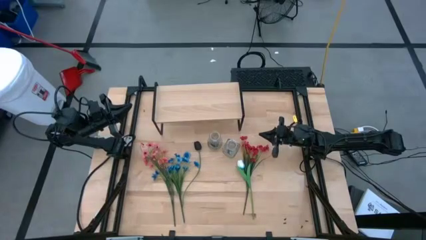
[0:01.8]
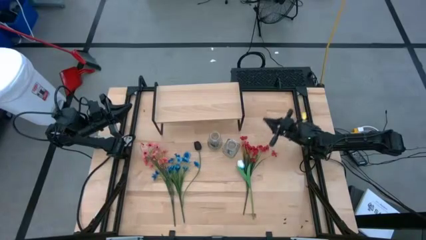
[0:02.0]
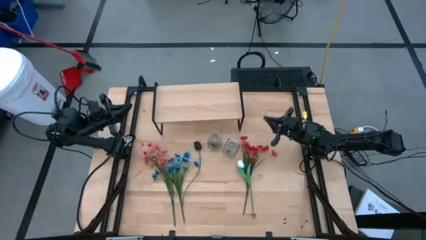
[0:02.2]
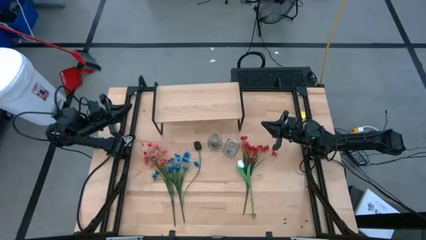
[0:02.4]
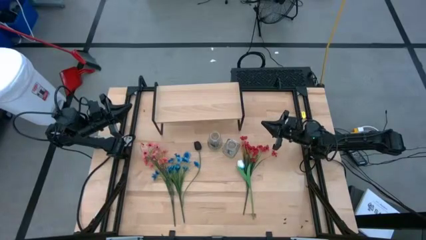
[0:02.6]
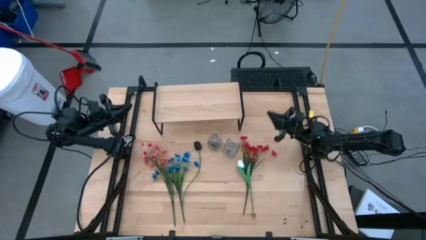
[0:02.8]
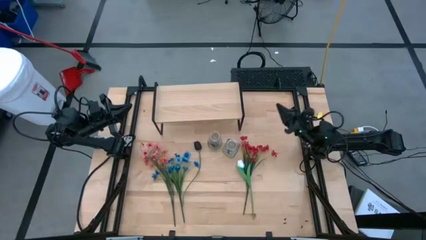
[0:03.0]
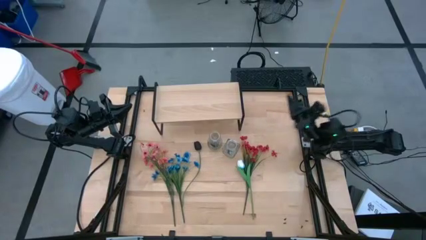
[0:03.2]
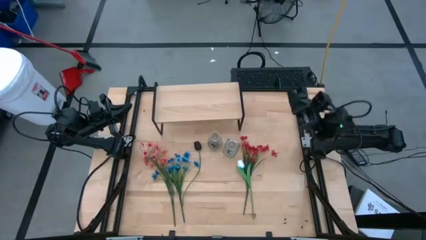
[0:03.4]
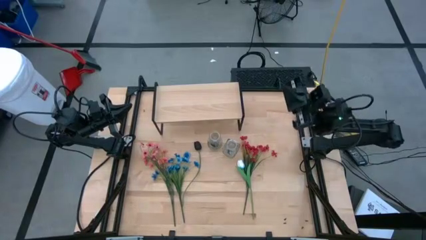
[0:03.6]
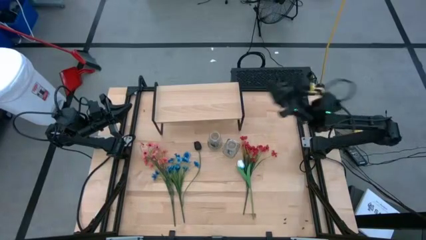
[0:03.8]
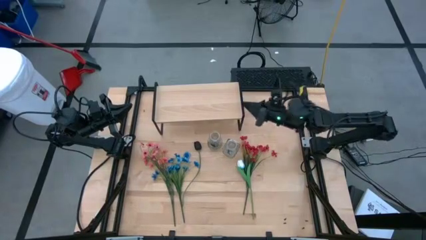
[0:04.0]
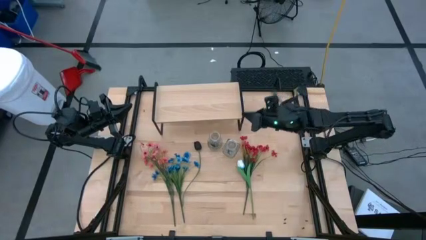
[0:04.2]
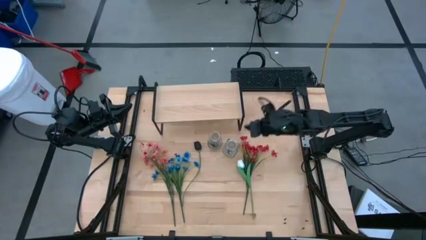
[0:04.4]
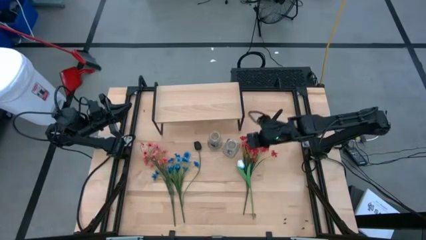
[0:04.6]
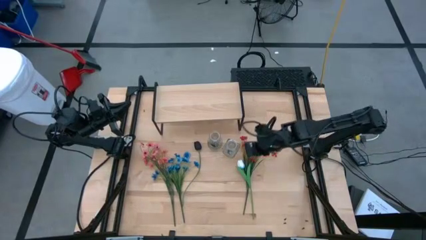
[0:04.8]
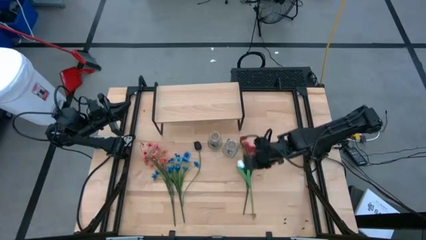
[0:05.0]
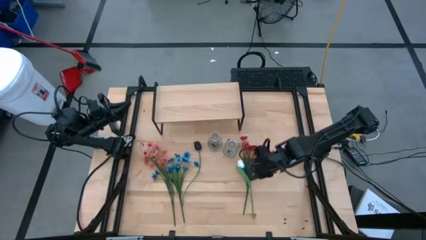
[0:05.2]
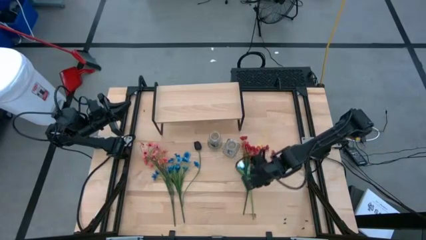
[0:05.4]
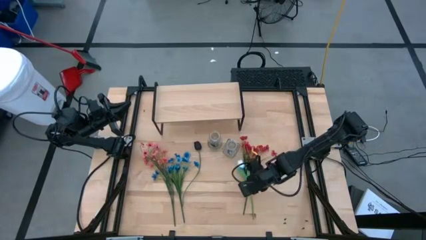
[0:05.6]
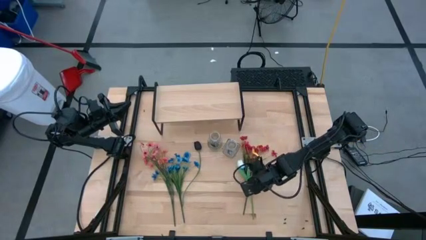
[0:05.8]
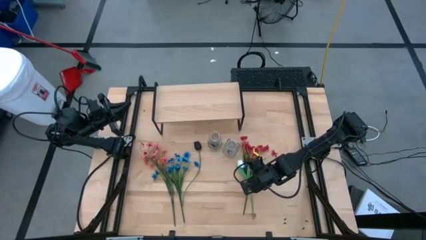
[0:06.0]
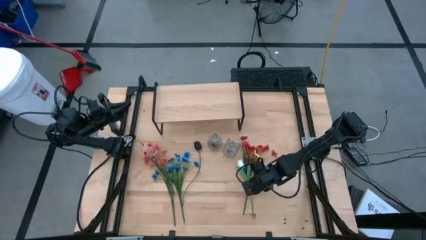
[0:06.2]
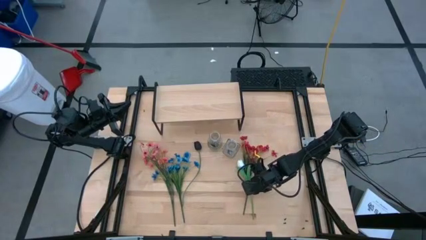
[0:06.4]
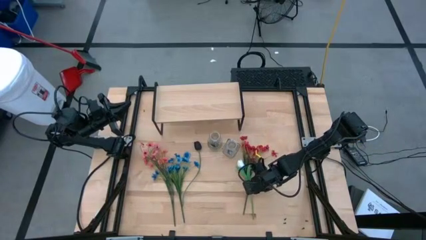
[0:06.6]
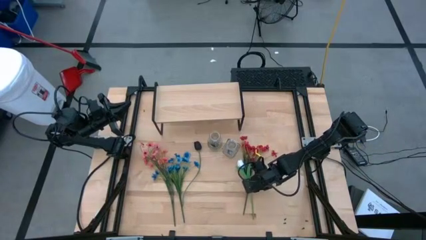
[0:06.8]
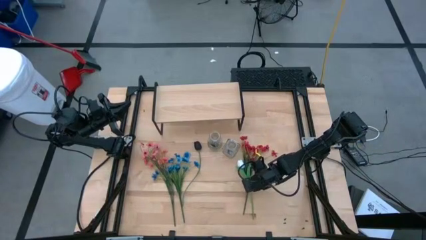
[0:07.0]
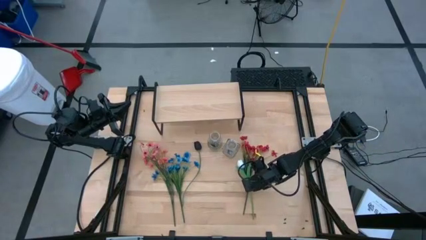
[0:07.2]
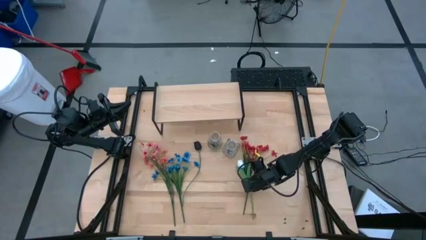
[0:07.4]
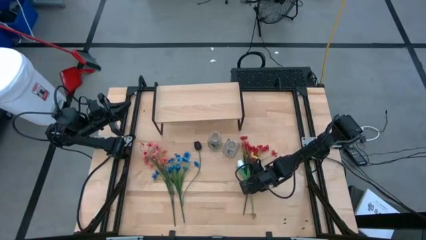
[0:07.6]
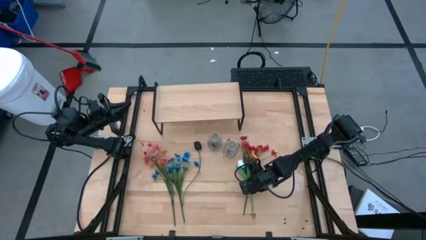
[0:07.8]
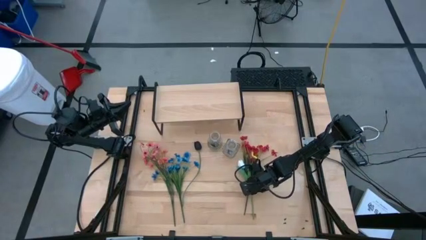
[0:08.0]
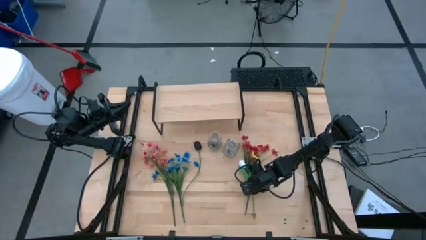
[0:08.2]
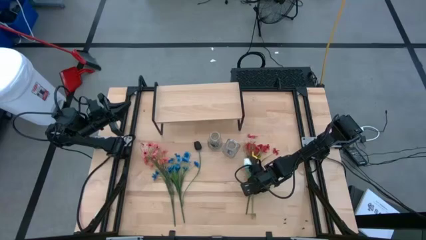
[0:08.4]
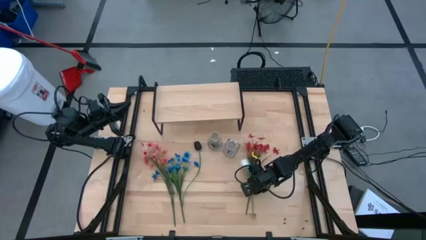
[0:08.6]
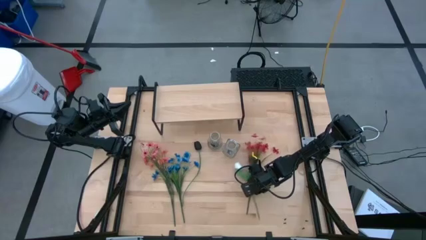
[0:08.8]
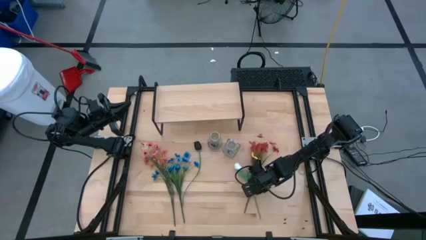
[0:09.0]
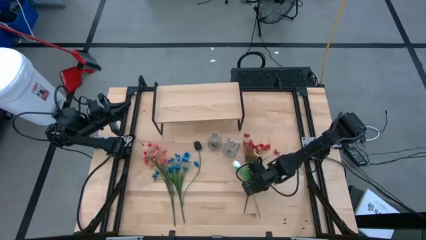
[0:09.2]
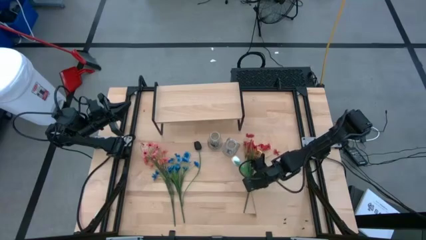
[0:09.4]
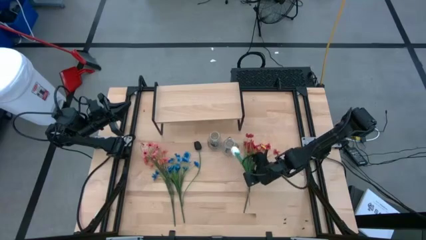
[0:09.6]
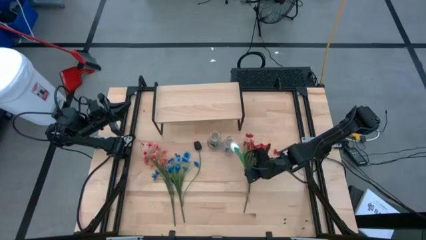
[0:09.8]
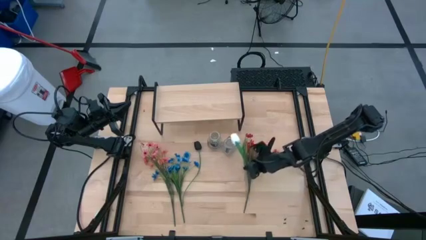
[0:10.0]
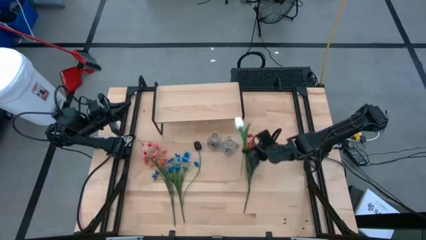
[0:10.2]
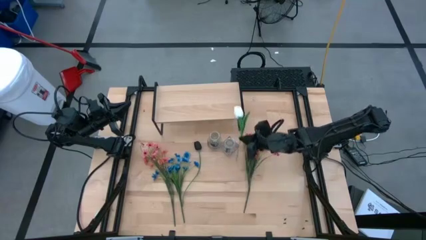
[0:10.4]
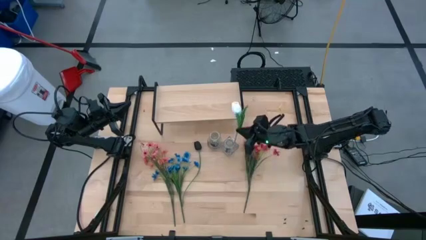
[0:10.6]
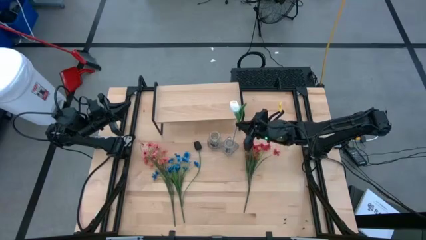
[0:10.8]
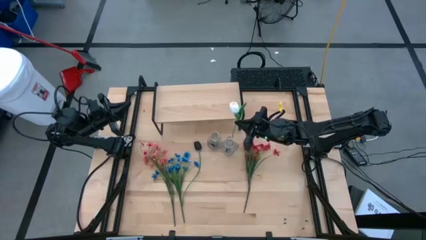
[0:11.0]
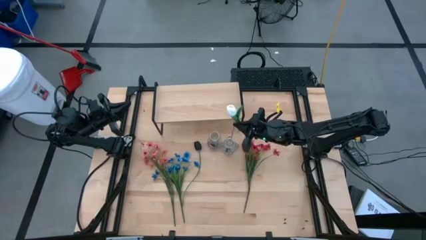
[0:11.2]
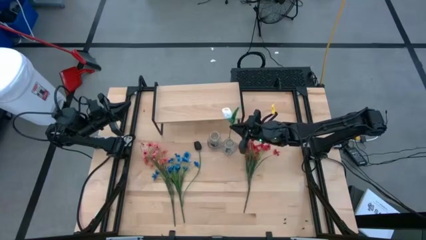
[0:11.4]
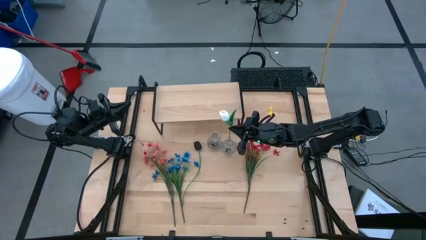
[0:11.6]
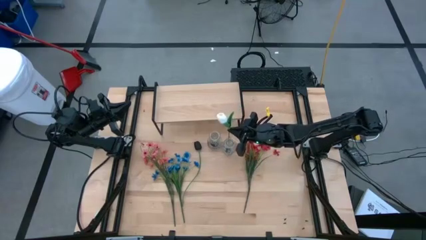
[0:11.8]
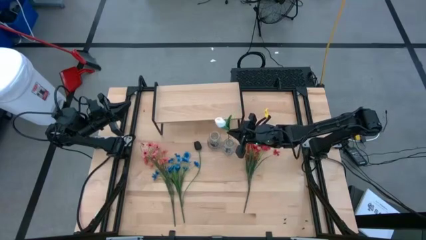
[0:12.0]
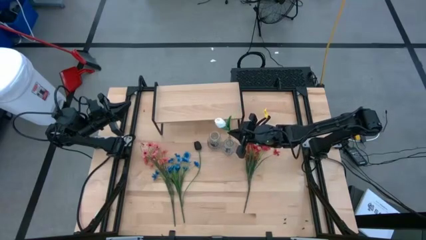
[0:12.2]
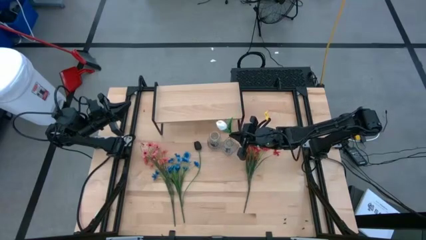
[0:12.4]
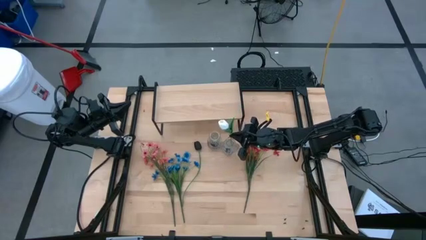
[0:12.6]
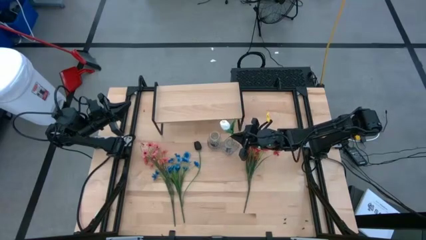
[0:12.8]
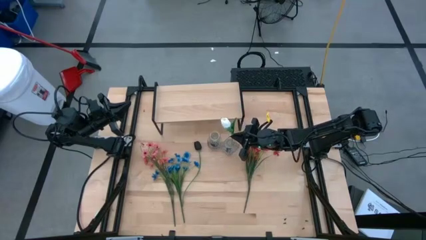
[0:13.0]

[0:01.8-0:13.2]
Task: Pick and place flowers into a vace then onto a shelf
Put the white flower into the right transparent vase

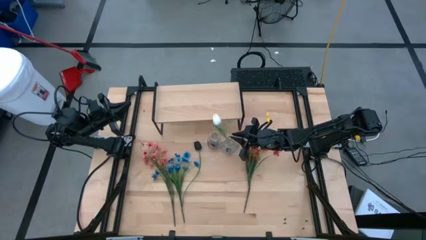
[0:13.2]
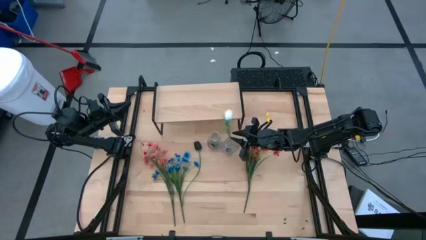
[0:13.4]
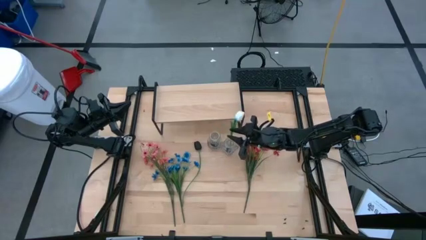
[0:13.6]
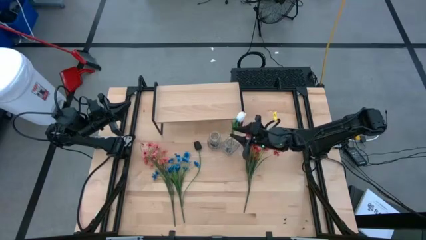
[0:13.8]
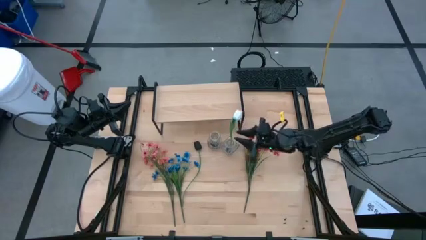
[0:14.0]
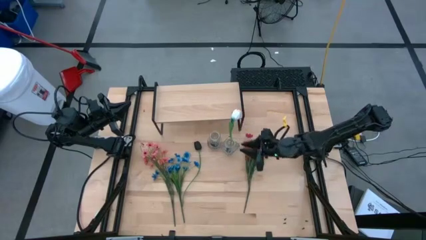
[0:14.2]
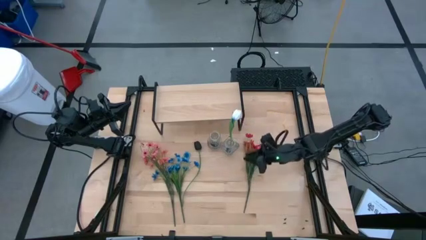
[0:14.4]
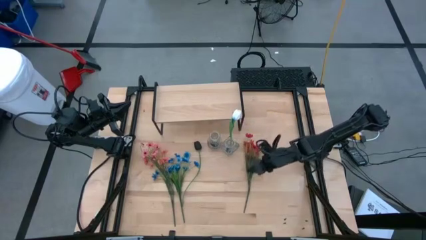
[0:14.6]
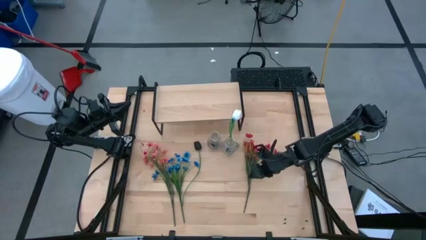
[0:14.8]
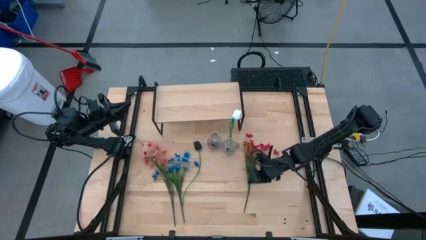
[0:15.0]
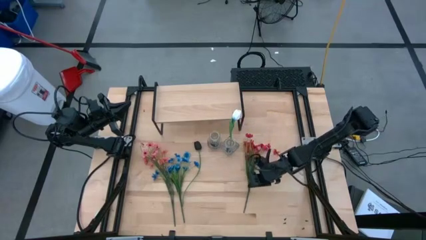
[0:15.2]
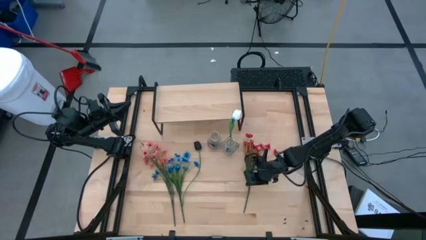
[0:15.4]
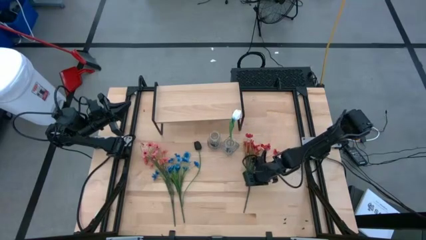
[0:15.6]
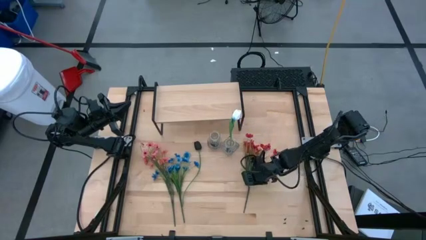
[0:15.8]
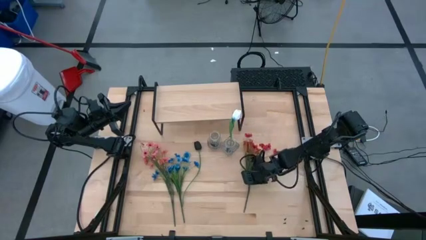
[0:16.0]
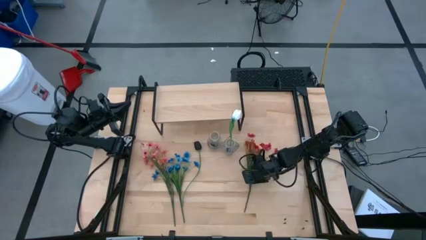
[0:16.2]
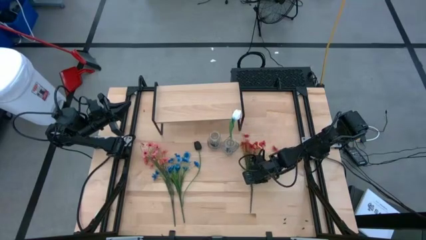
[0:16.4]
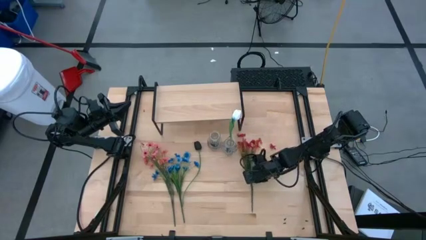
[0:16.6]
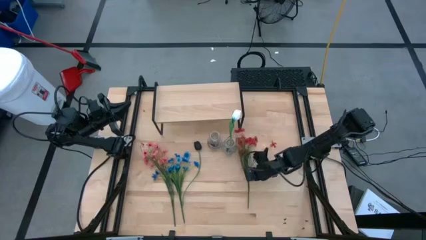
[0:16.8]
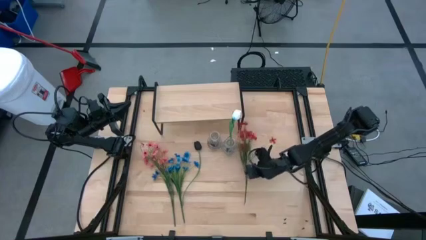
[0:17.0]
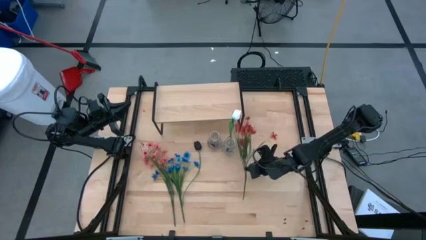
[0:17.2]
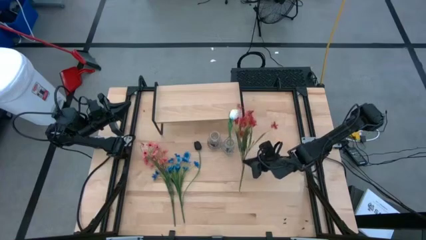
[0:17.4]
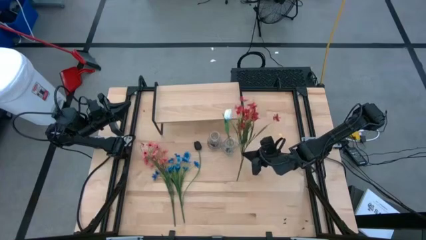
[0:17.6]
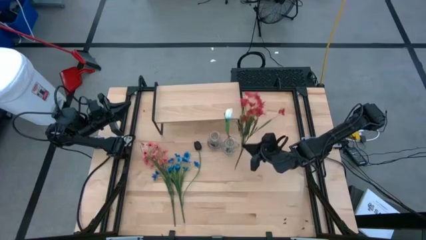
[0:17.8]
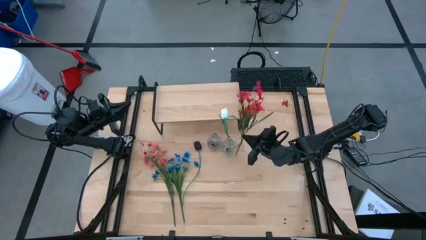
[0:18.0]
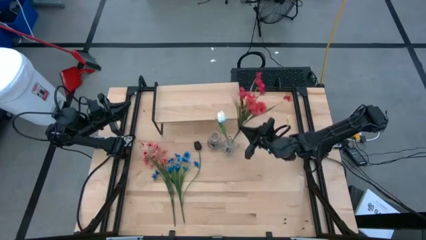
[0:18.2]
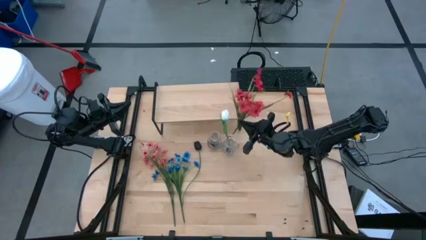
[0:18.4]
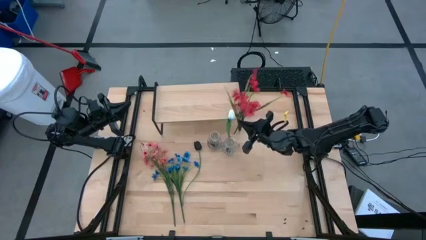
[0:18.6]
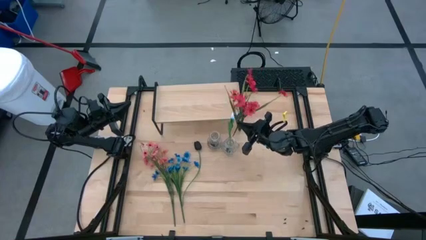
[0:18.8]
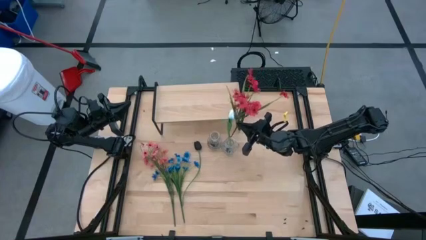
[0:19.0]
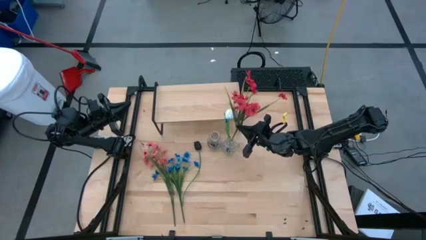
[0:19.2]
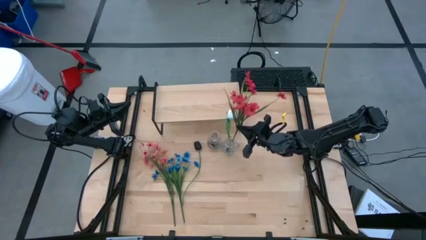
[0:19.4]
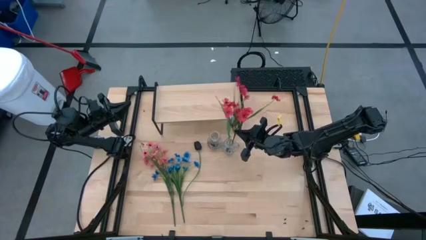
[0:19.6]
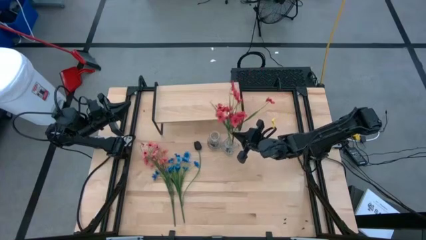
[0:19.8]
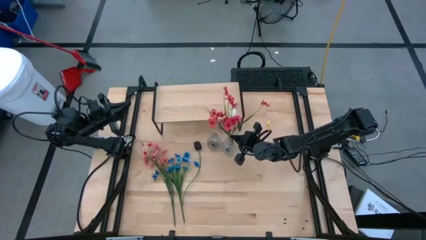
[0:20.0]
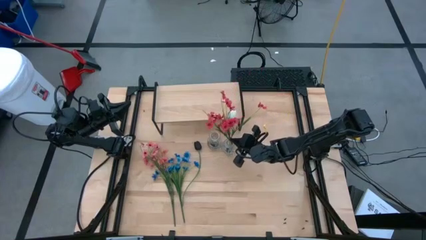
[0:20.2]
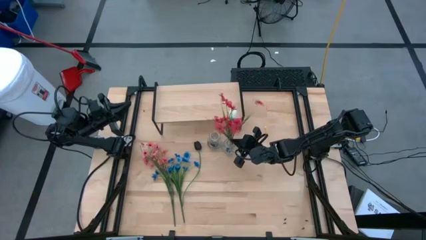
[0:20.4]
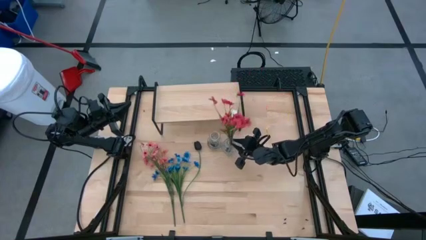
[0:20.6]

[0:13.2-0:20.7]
Put the red flowers into the right transparent vase
